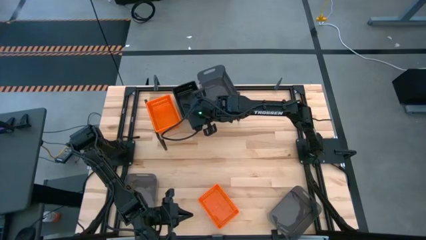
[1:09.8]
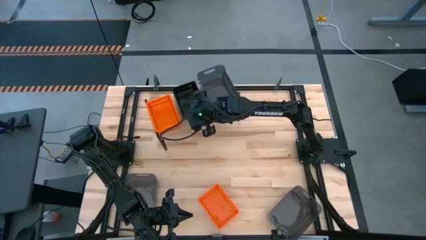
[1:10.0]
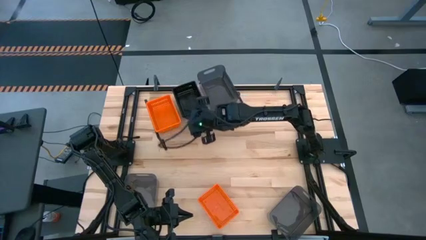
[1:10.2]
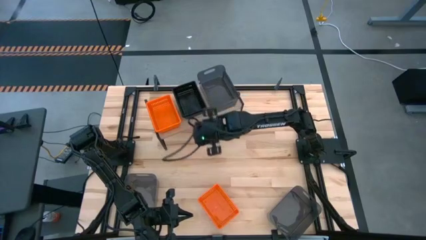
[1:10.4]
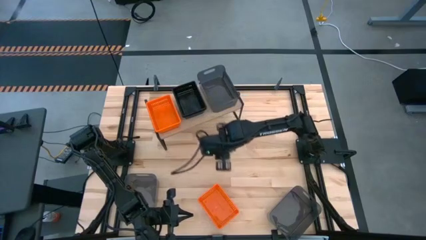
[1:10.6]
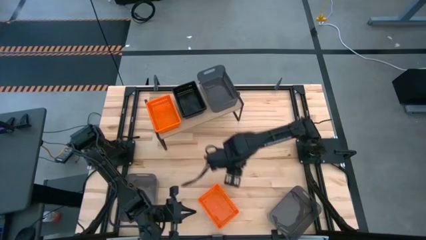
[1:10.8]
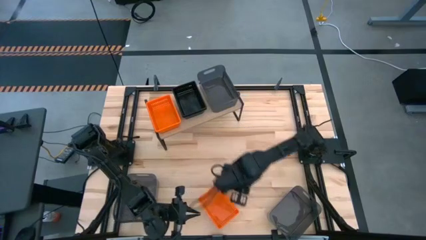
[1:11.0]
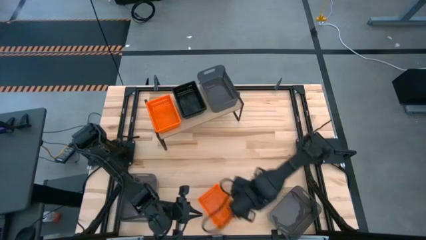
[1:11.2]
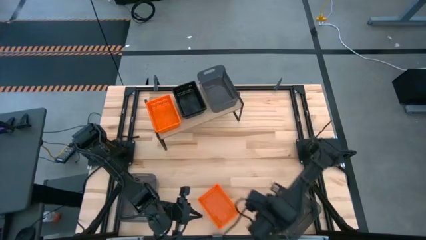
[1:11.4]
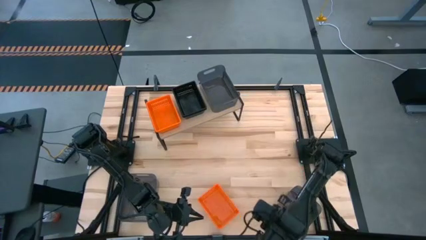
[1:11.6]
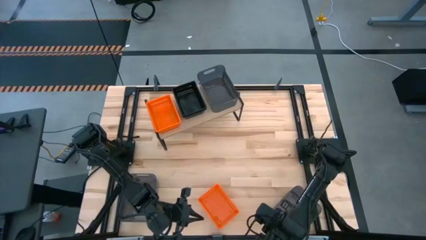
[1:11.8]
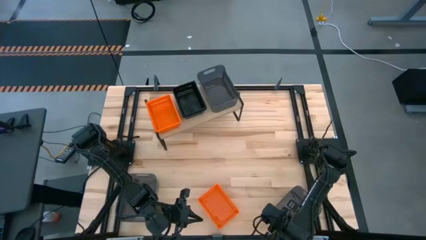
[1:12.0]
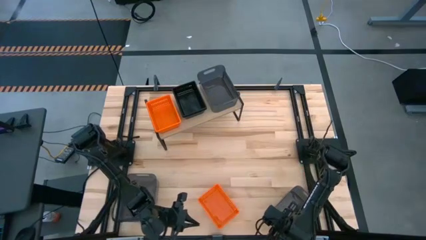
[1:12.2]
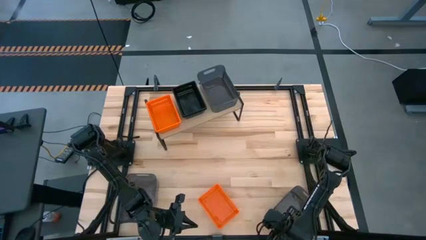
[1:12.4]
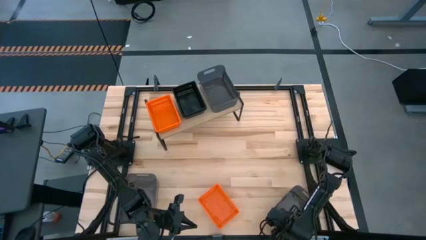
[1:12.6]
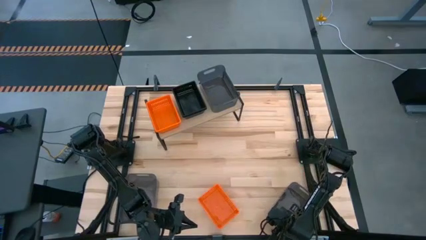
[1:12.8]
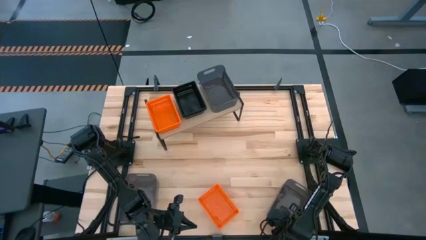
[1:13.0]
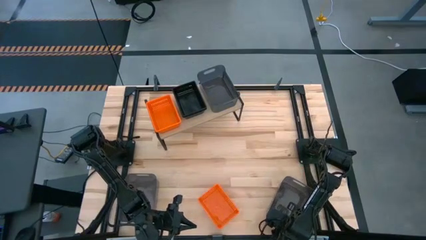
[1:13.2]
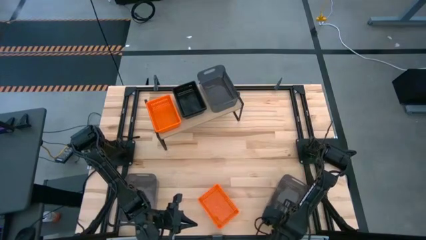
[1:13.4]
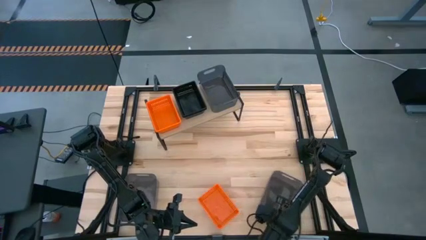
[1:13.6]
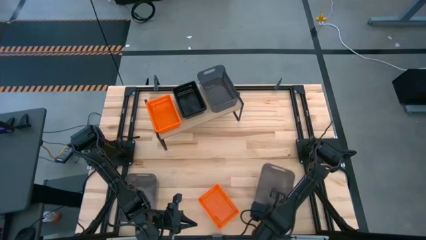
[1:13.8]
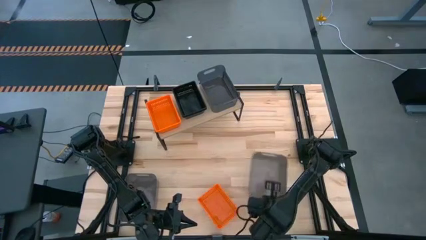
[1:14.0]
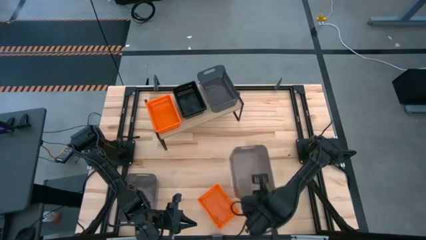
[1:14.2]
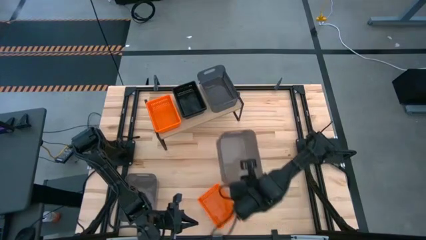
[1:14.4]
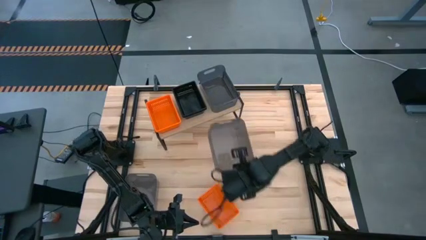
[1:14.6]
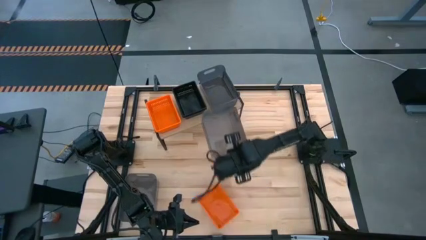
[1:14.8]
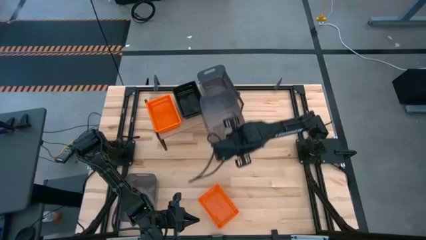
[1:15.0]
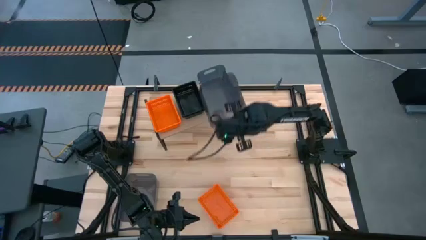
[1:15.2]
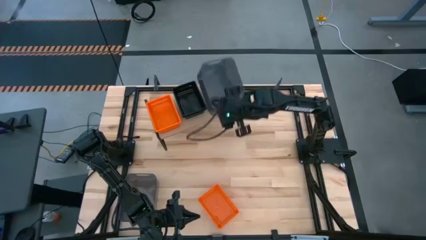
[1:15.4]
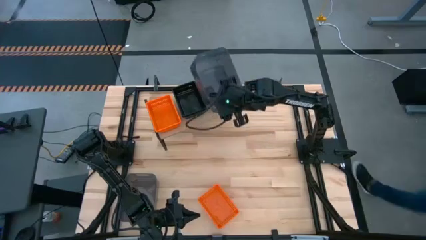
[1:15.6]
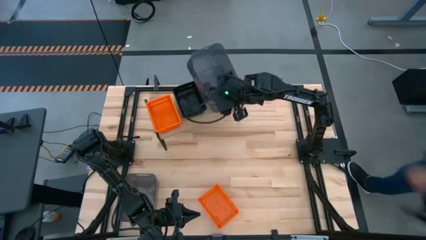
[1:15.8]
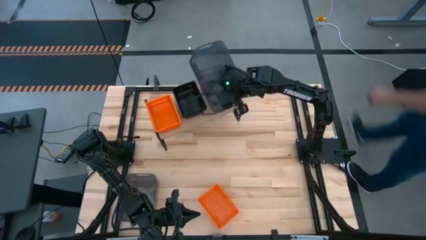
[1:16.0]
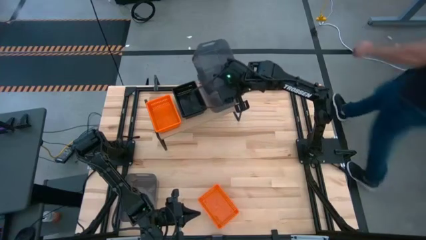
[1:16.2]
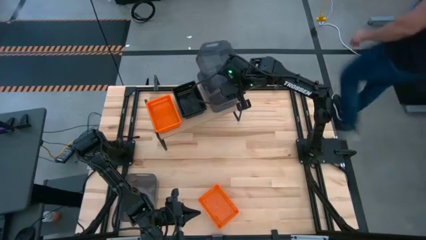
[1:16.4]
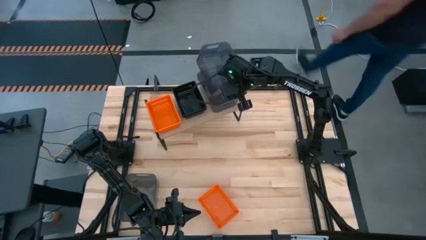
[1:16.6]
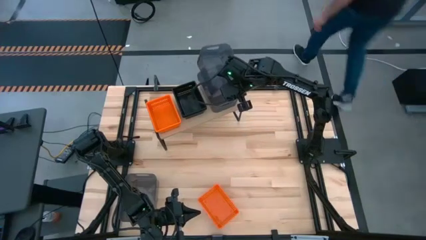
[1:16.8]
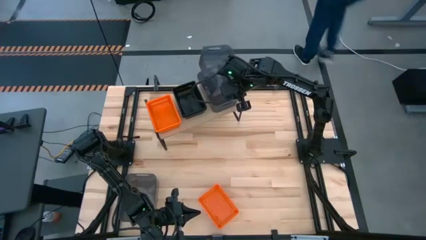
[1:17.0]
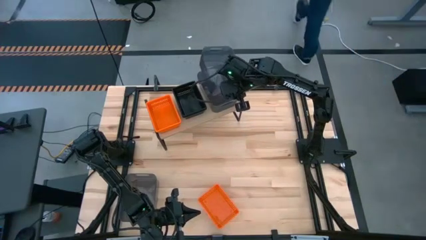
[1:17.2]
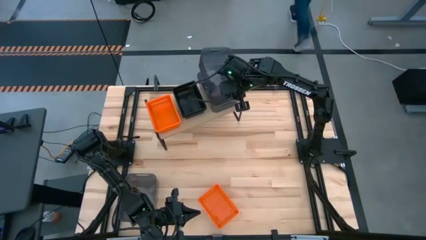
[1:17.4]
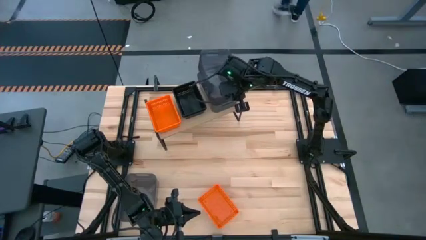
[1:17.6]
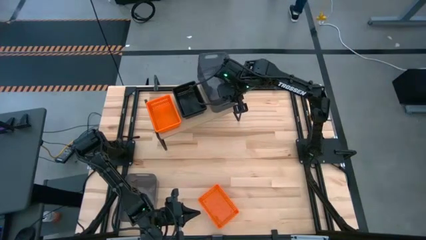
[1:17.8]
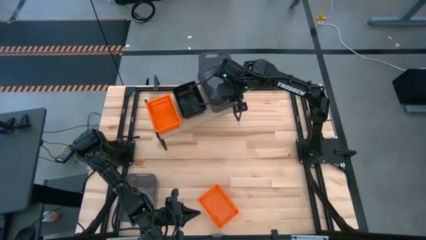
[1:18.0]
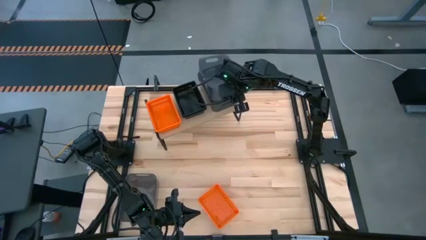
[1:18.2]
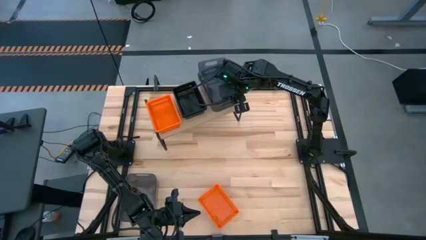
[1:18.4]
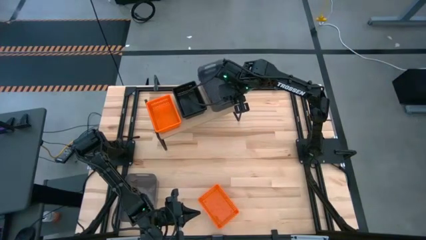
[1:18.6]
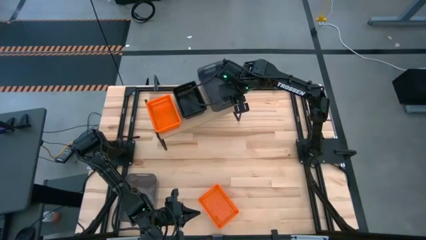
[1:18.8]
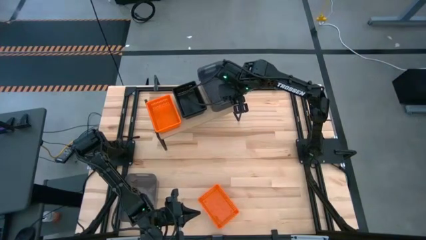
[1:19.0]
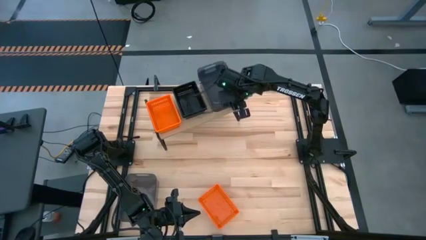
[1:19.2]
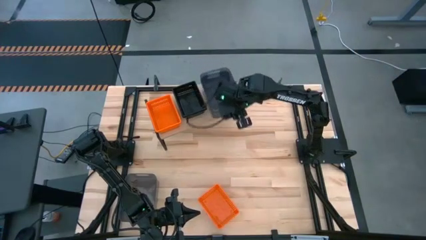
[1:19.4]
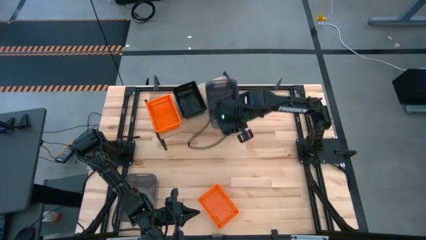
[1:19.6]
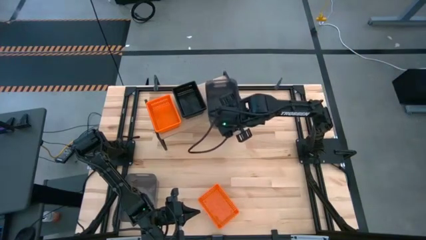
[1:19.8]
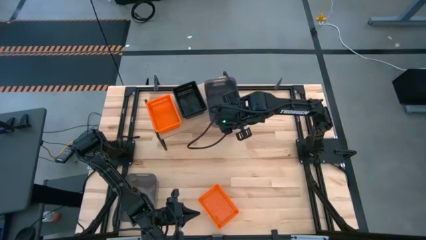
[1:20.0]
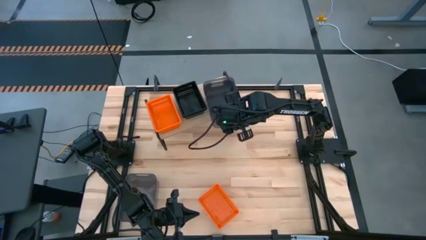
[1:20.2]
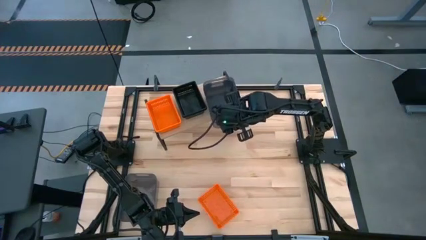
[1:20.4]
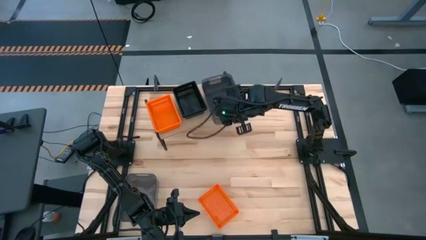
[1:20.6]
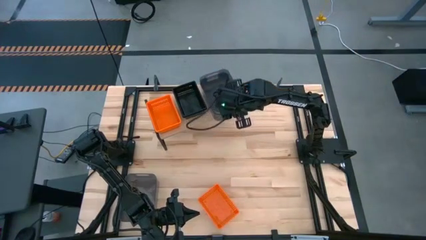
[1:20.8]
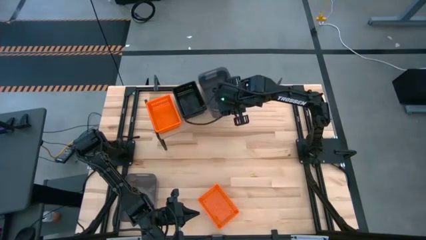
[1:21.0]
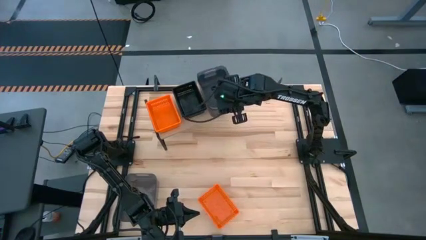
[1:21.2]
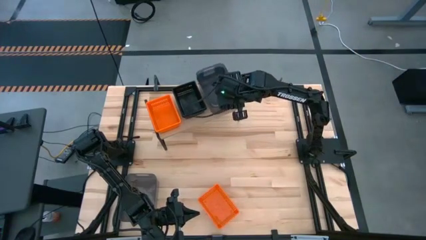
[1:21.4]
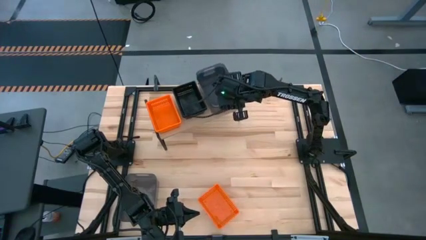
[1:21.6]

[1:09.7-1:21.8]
Task: Stack baskets on shelf by color
Stack the right gray bin on top of the gray bin on the shelf
